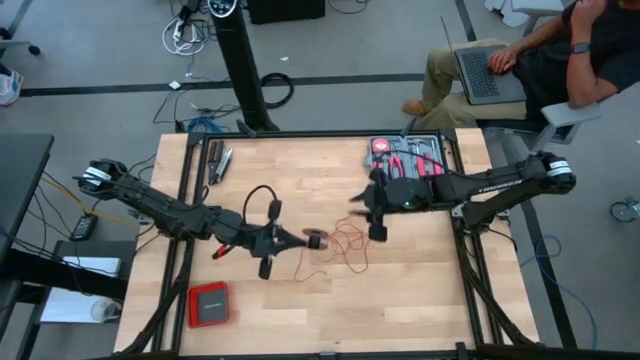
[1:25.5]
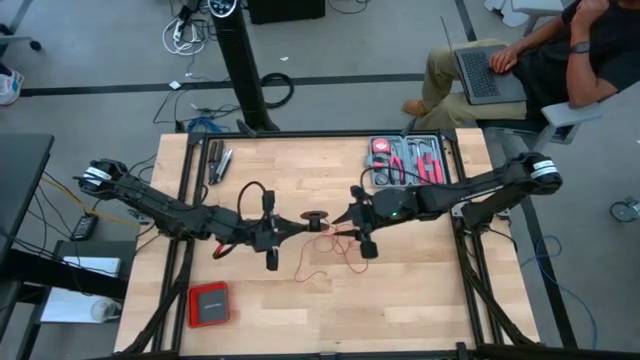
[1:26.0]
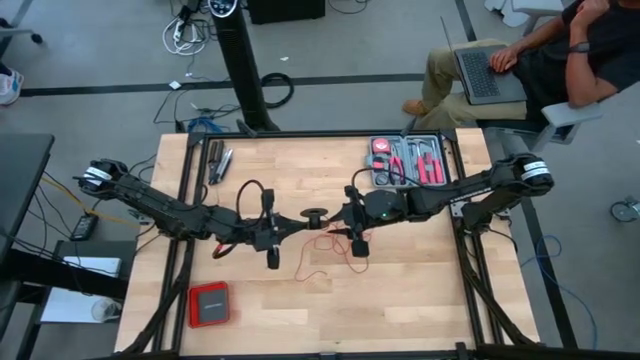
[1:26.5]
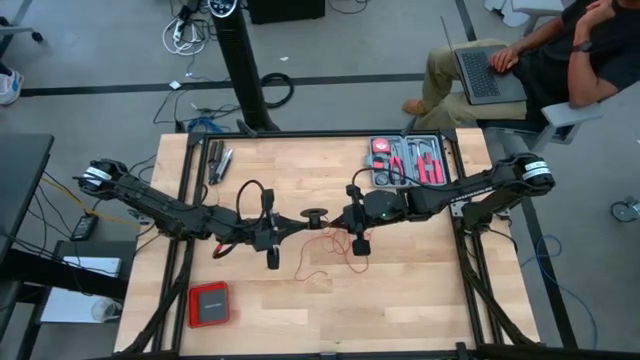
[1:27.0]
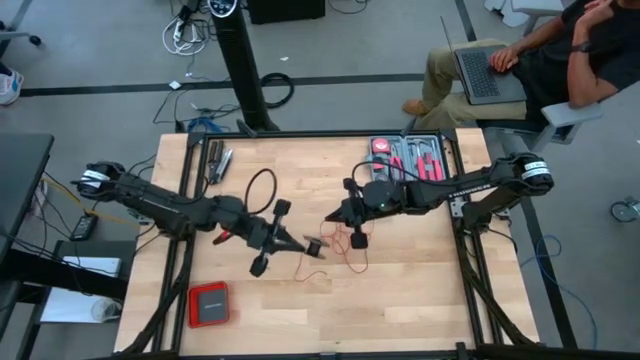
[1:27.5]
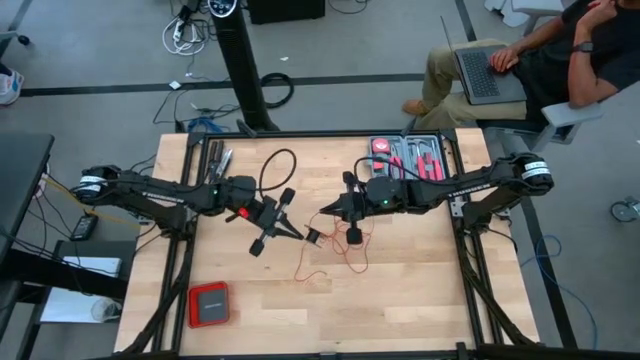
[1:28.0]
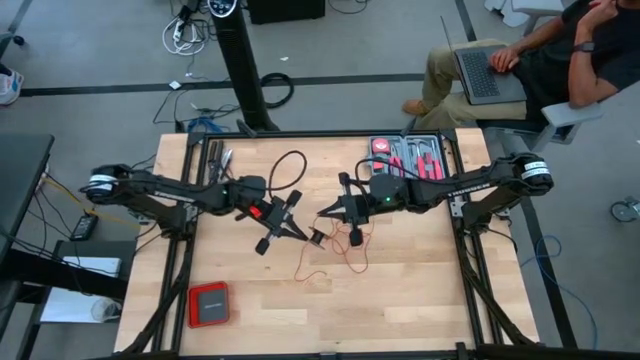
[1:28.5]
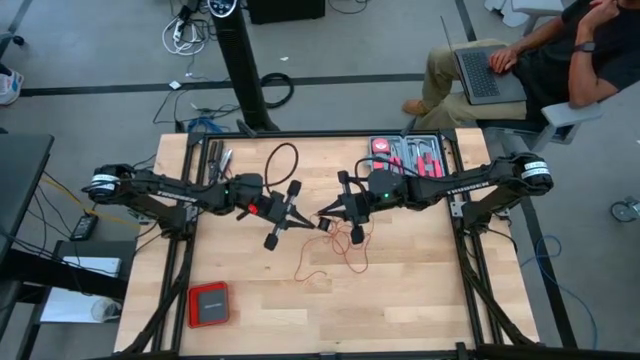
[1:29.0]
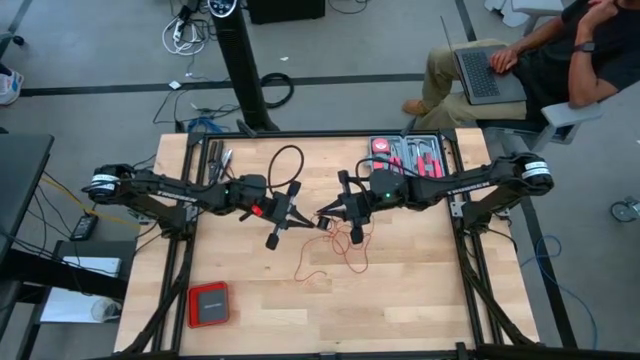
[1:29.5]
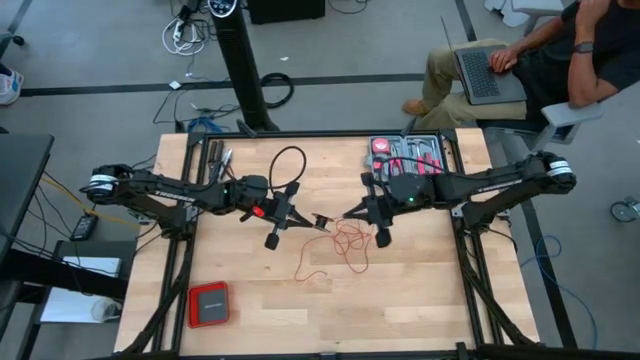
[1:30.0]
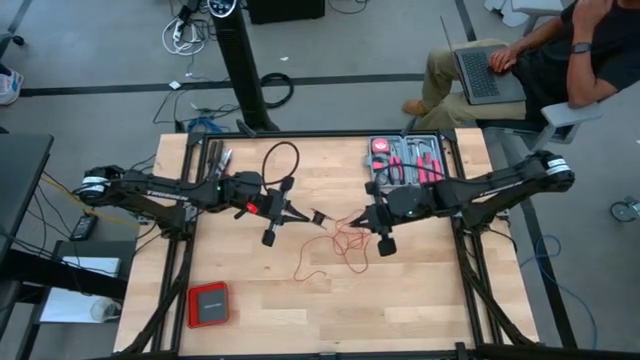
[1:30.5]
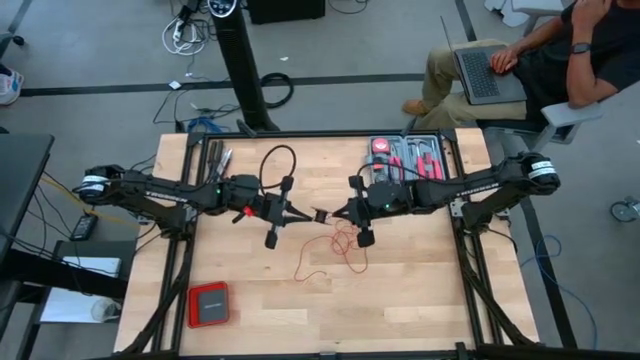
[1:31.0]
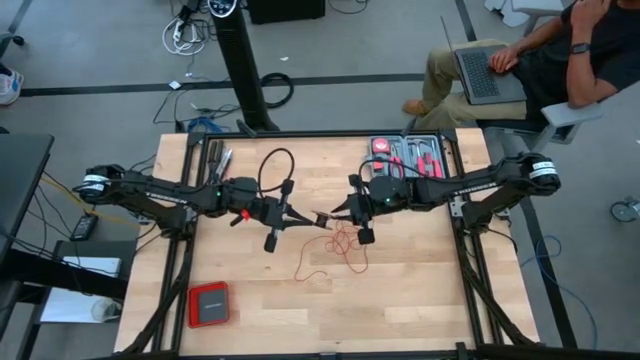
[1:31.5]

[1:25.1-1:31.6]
Task: Coil cords
Coil the red cable wire onto the black spool

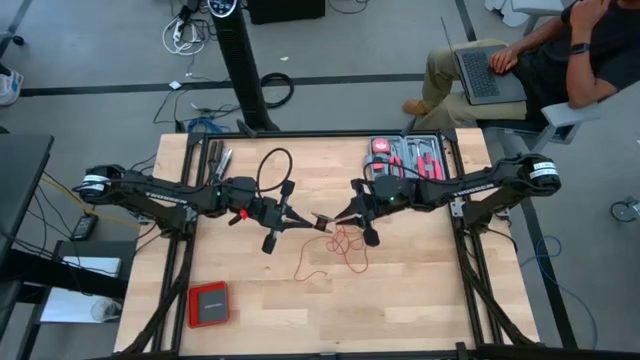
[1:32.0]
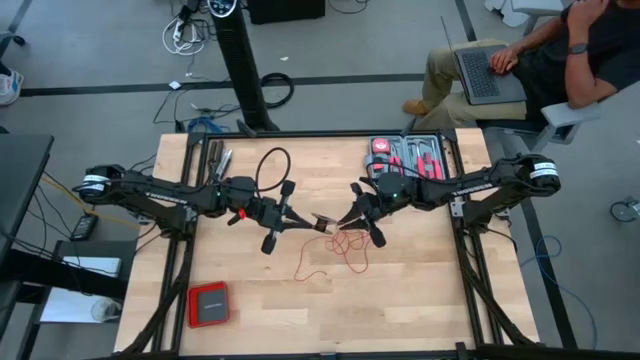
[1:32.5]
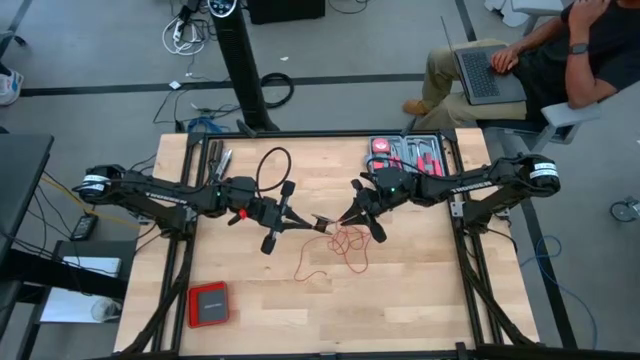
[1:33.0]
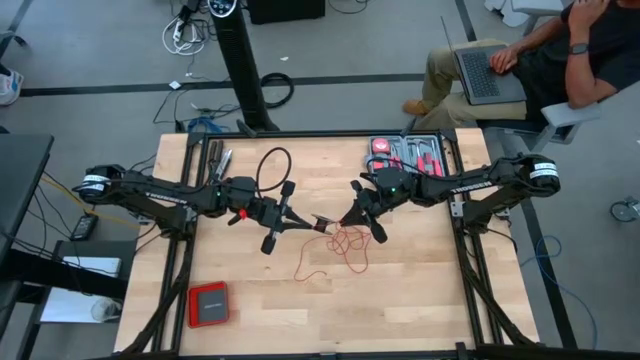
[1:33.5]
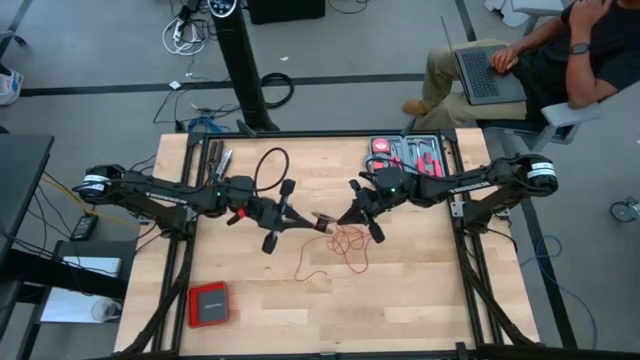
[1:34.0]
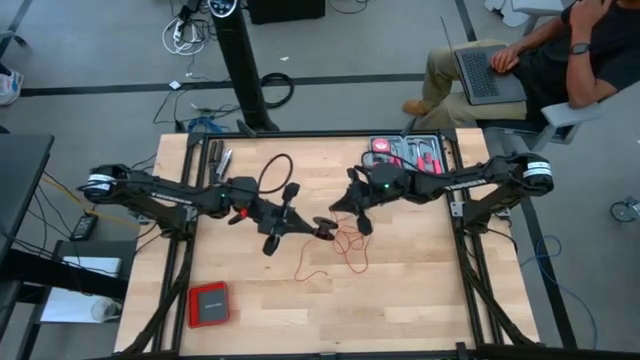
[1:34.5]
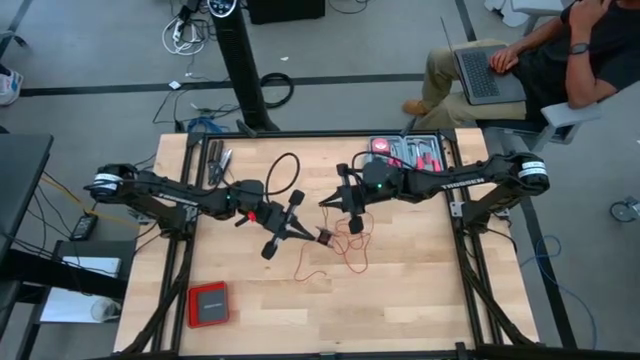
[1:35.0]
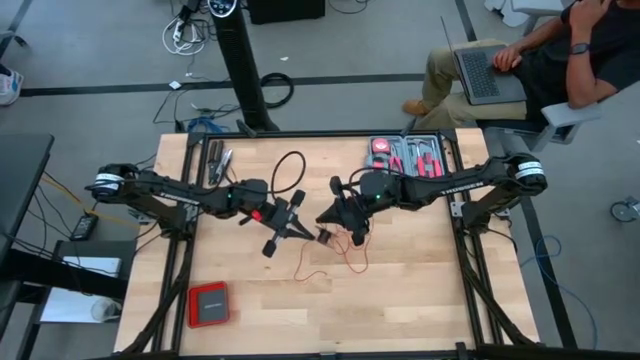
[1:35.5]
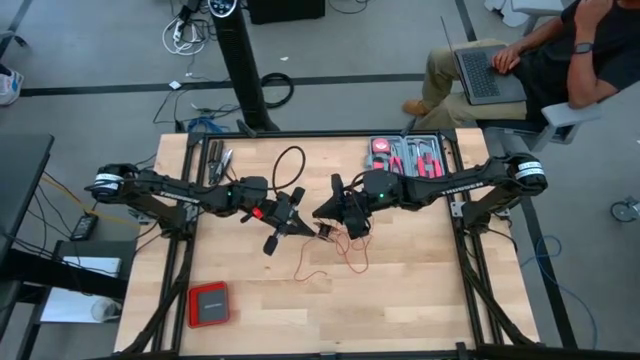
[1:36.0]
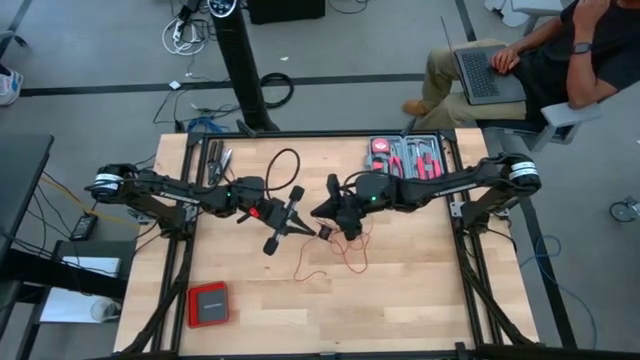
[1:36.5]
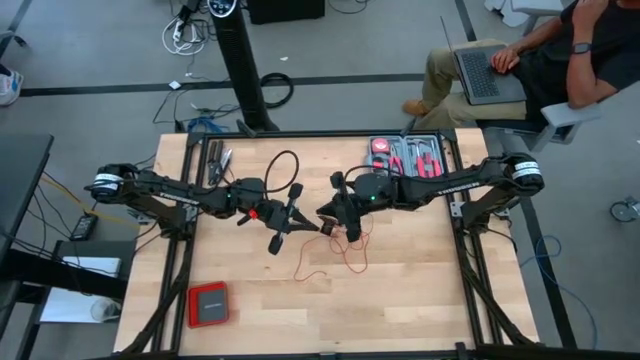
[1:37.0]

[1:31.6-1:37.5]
Coil the red cable wire onto the black spool

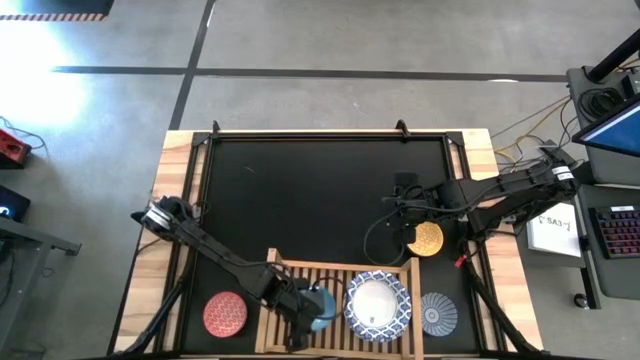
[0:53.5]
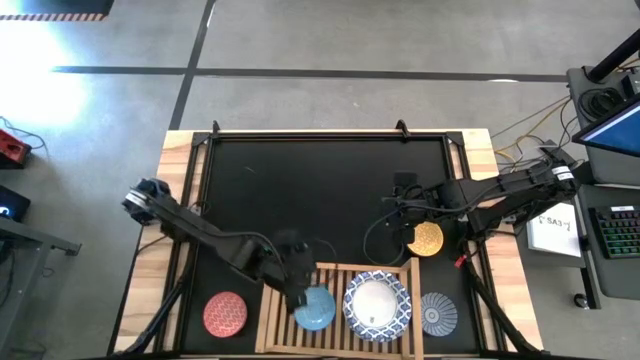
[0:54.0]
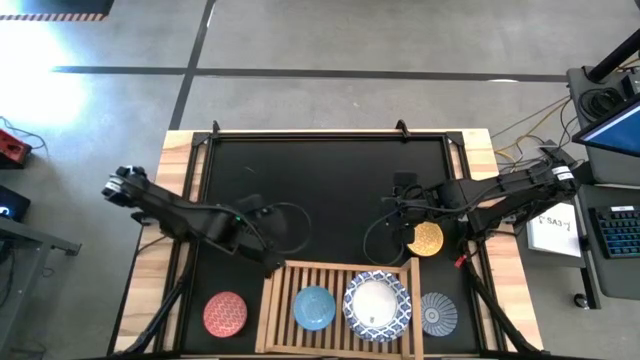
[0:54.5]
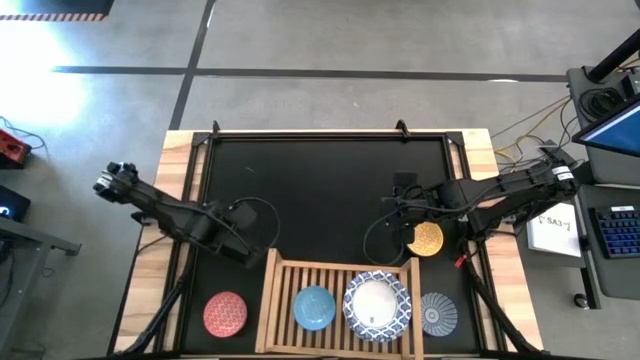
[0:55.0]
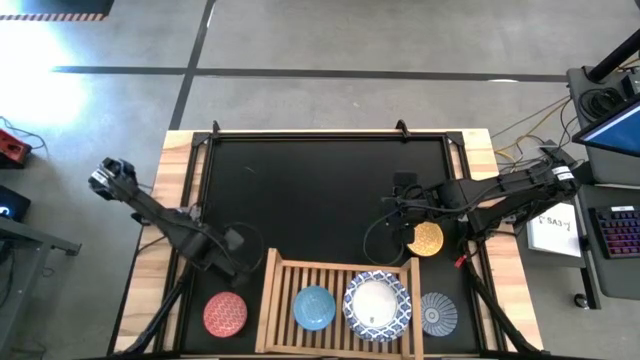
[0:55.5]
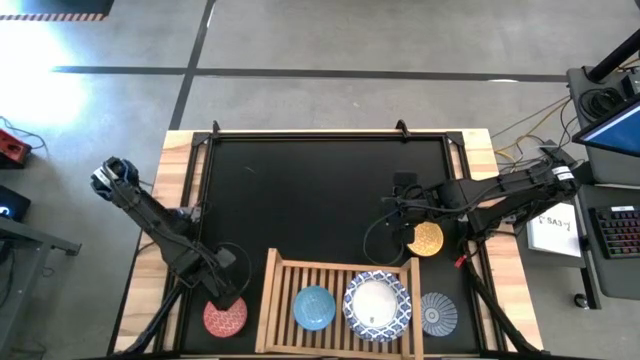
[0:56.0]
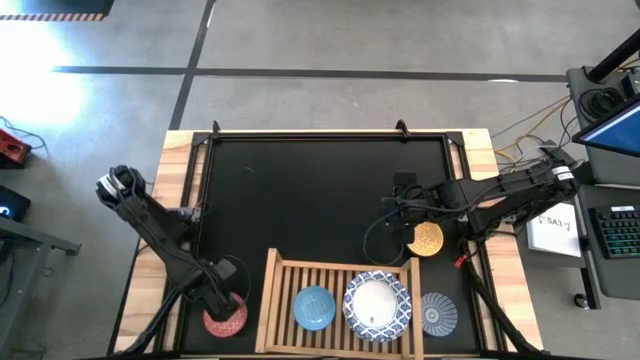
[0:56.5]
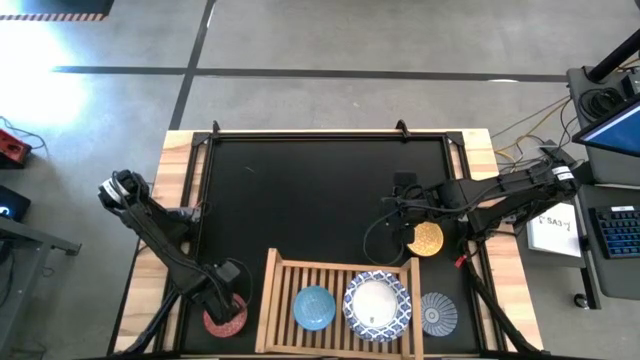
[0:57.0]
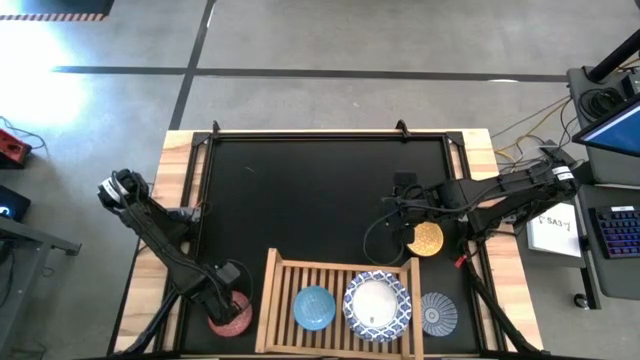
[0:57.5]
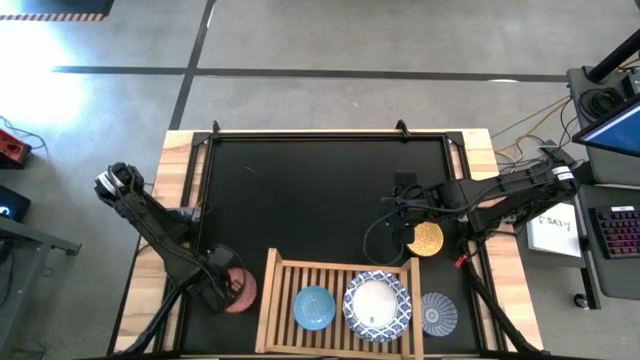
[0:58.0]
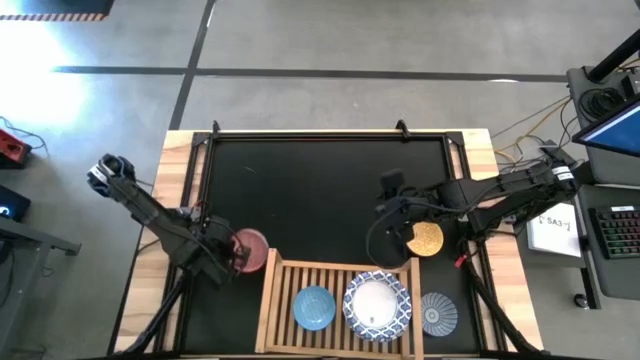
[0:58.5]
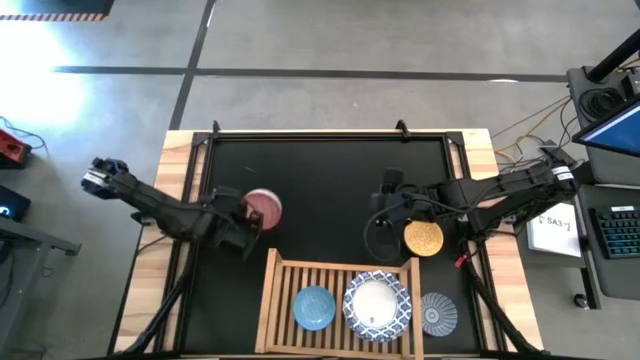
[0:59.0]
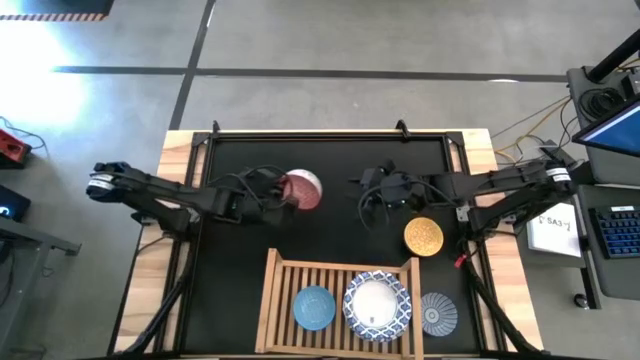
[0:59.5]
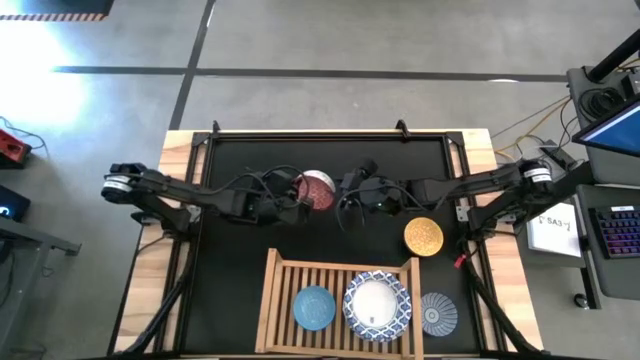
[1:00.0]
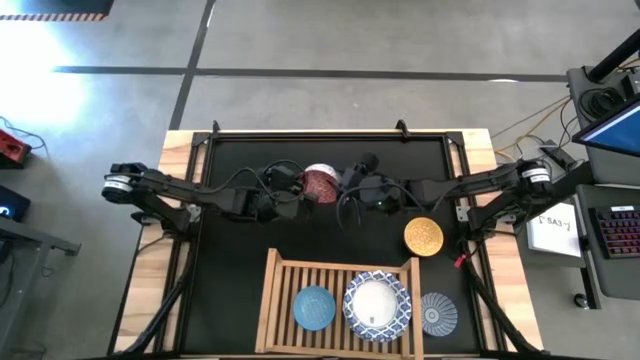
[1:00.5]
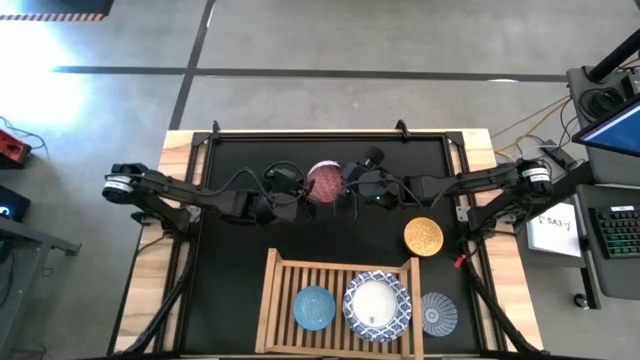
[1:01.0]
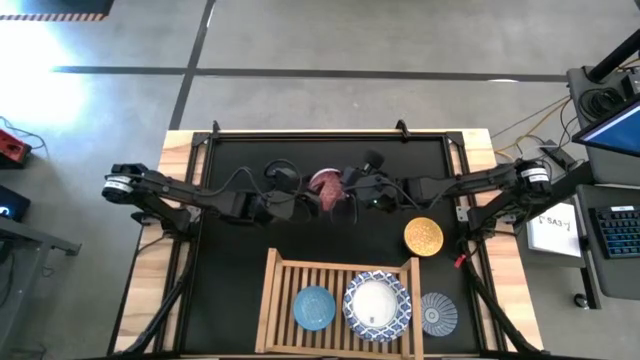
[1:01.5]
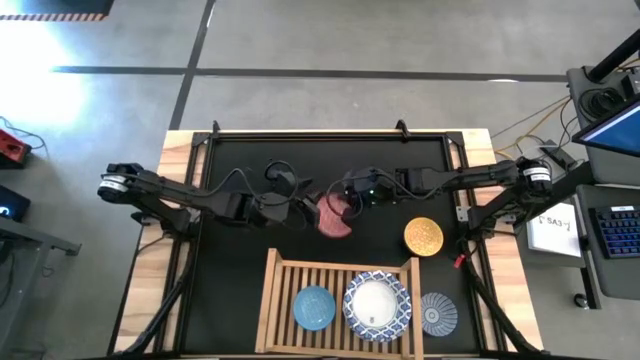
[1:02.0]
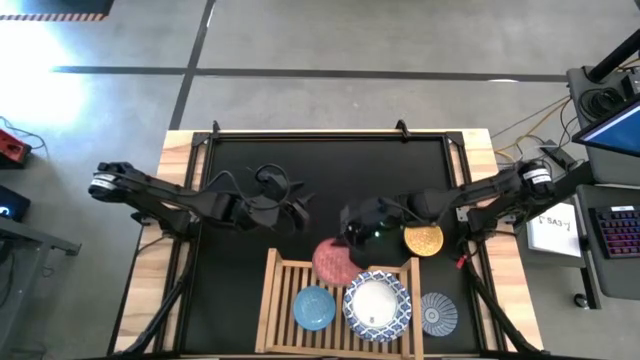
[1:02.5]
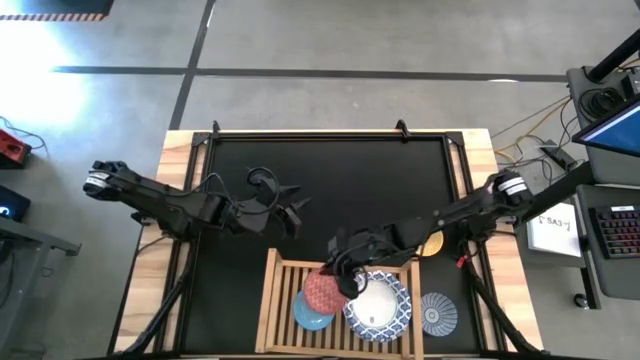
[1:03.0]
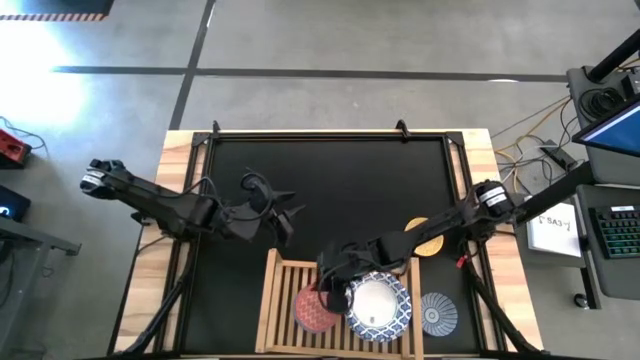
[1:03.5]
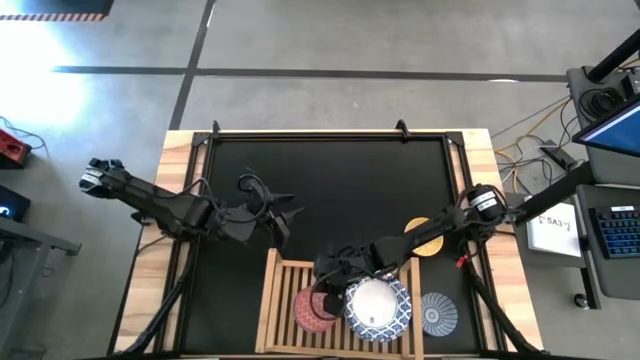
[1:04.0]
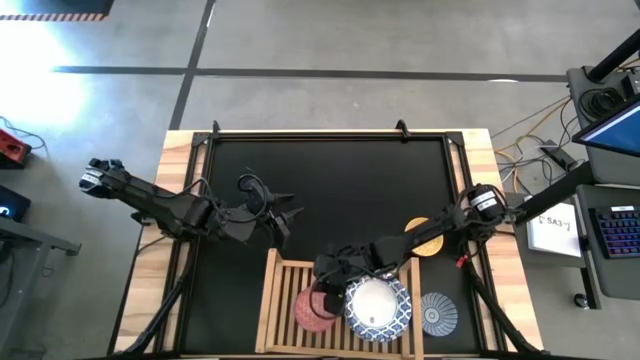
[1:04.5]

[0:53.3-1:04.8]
Task: Place and stack bowls onto a shelf
Stack the red patterned bowl on top of the blue patterned bowl on the shelf
